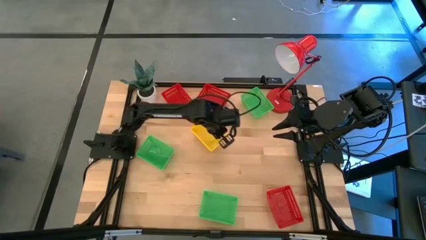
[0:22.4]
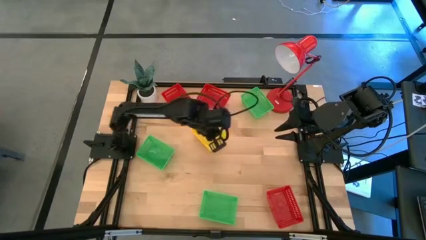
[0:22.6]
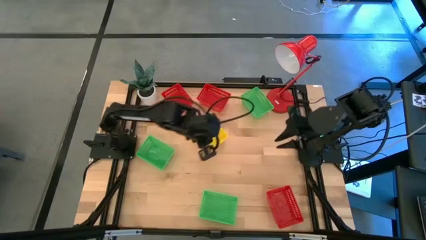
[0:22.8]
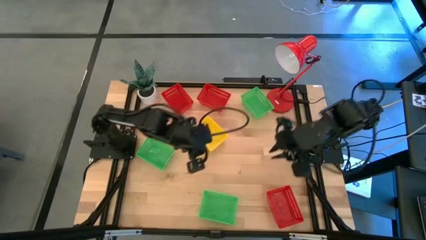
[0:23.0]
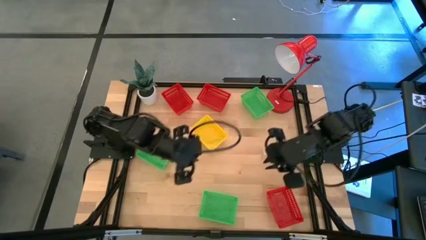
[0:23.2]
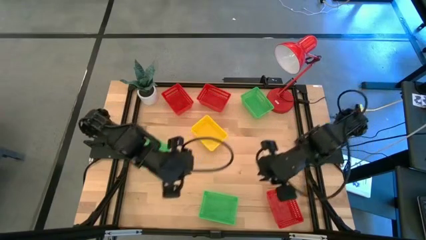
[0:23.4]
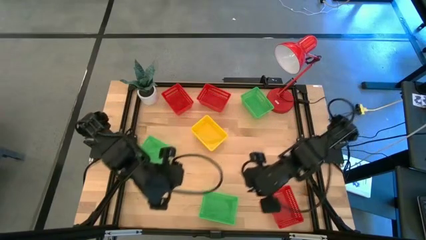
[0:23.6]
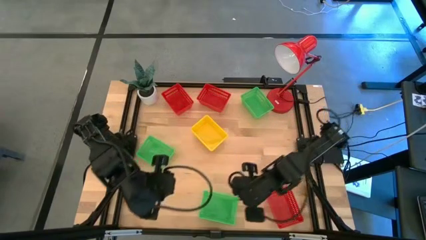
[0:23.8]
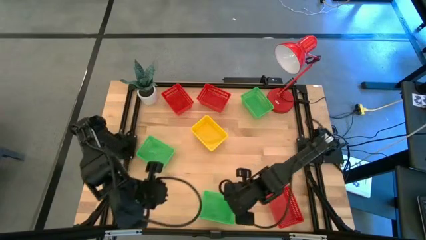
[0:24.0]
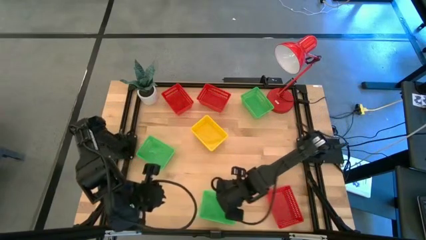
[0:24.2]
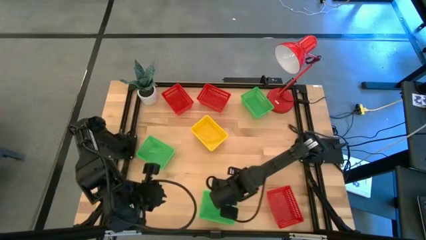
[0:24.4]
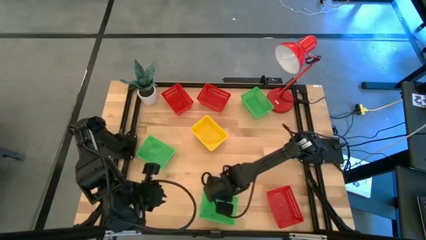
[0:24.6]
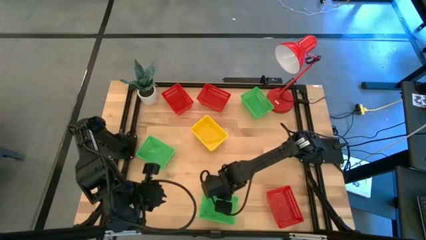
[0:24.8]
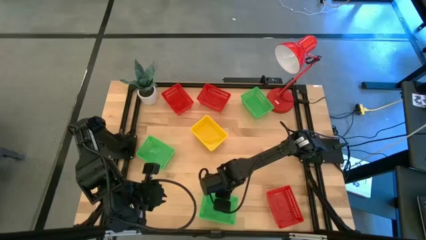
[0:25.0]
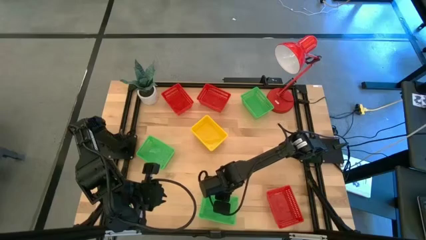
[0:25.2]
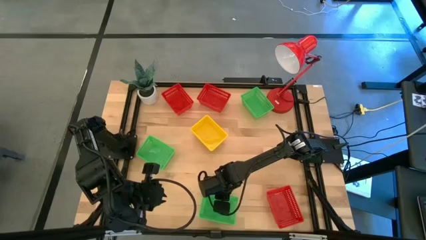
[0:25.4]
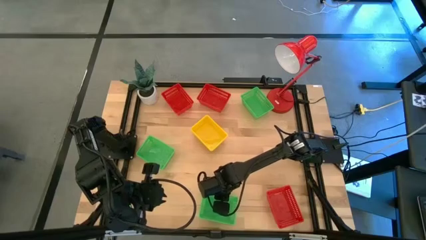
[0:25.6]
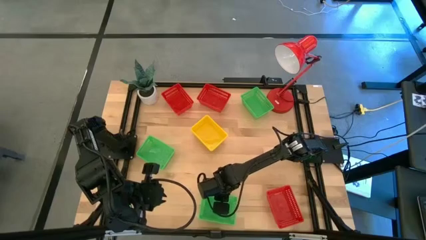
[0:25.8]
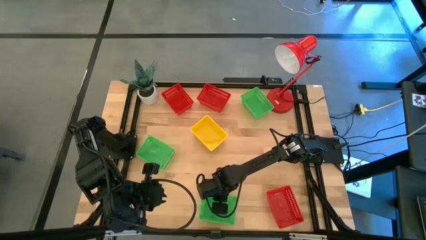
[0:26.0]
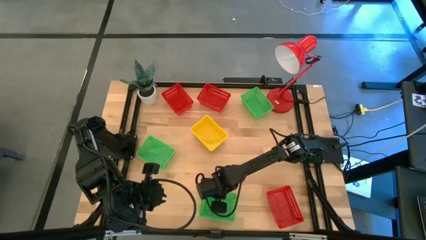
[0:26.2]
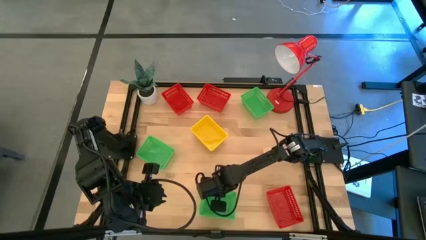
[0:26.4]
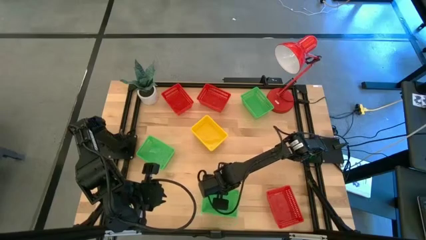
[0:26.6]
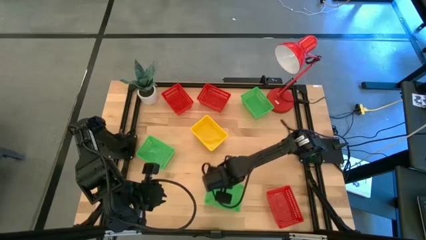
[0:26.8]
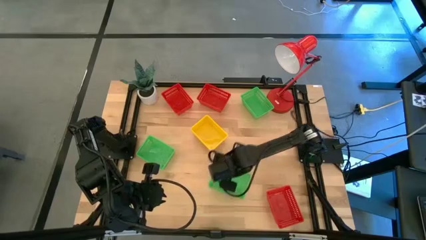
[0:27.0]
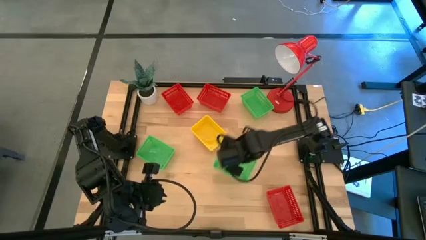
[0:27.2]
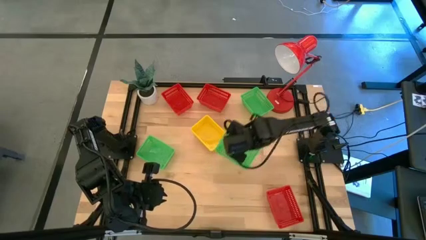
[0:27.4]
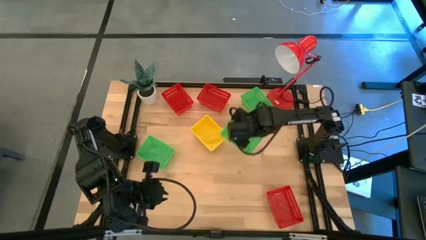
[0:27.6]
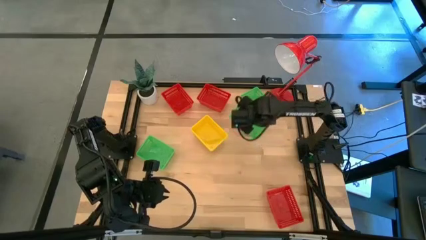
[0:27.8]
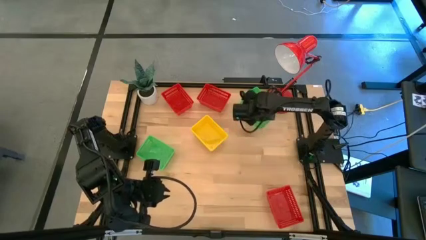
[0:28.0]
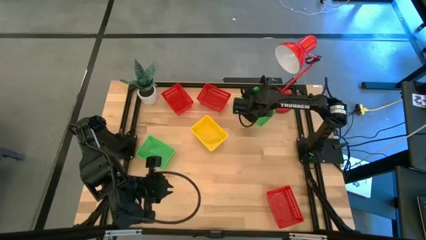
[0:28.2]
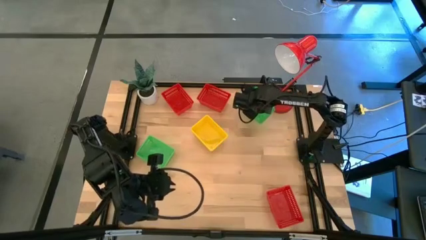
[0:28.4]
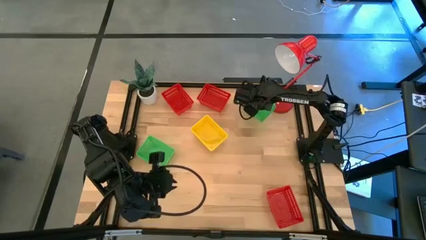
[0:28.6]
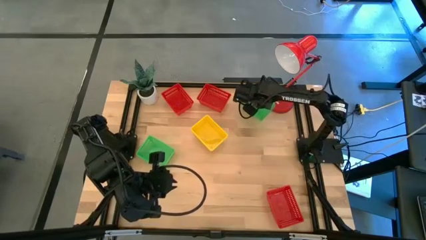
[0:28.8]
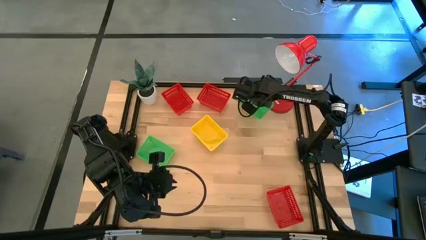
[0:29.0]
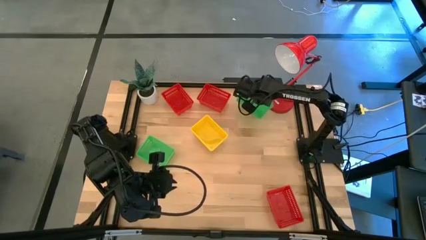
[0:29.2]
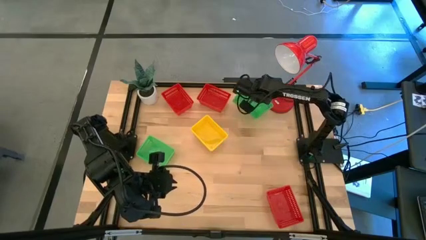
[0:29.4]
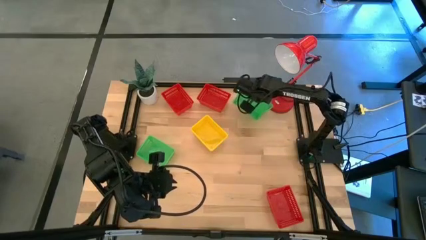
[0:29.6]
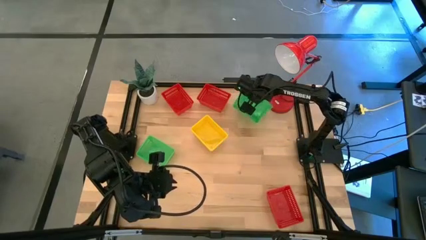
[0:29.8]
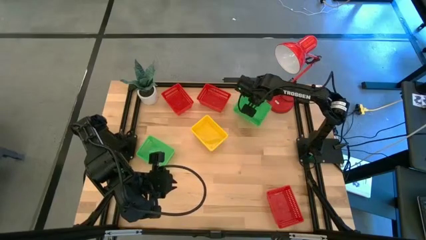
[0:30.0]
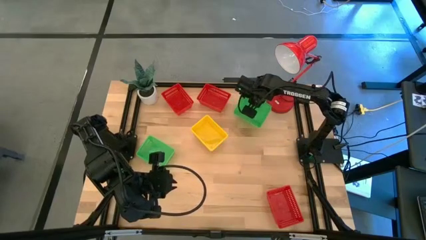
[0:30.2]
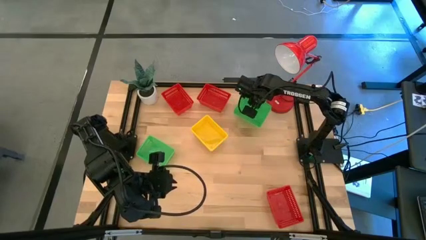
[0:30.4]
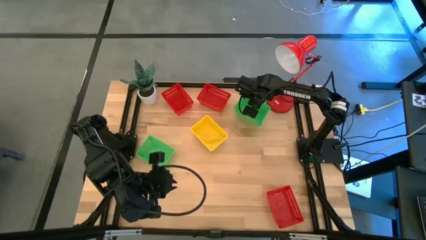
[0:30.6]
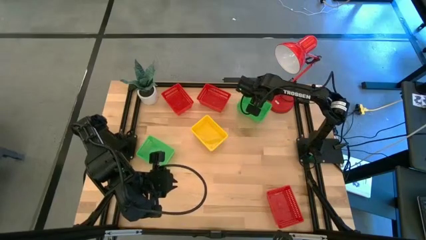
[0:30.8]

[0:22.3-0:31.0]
Stack the bottom green bin on the green bin

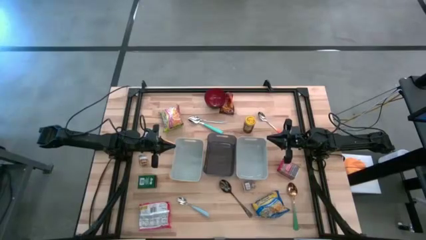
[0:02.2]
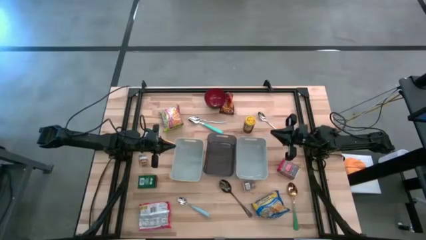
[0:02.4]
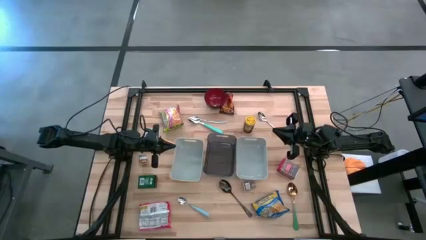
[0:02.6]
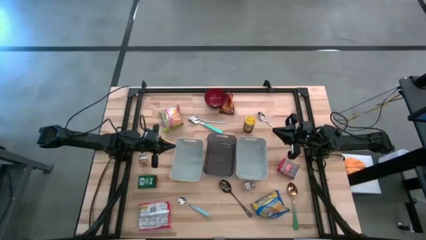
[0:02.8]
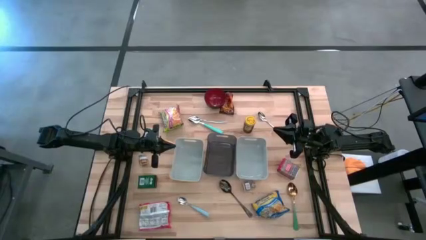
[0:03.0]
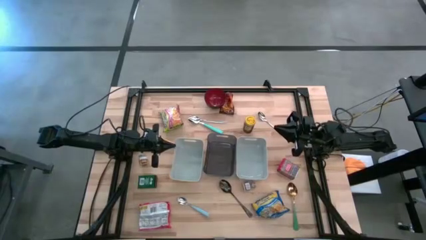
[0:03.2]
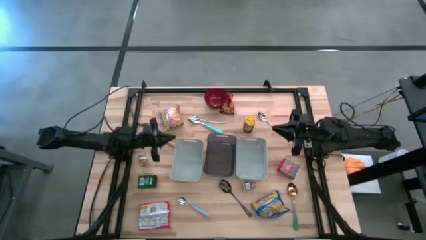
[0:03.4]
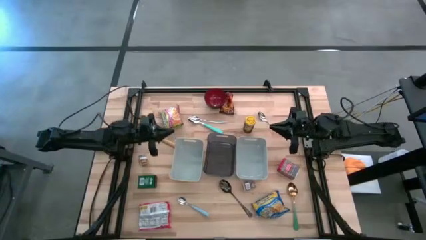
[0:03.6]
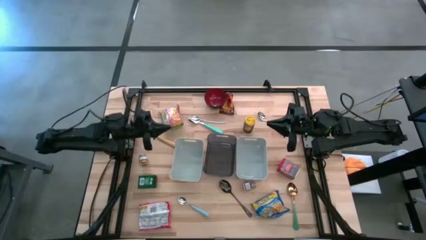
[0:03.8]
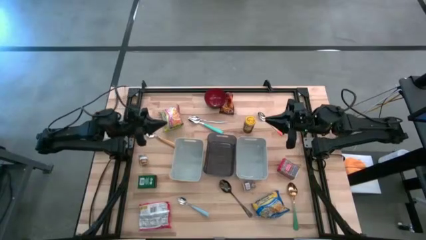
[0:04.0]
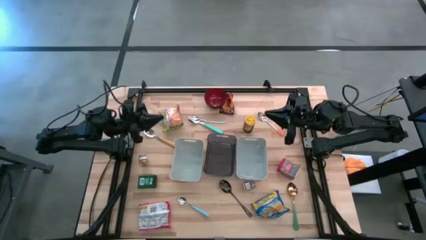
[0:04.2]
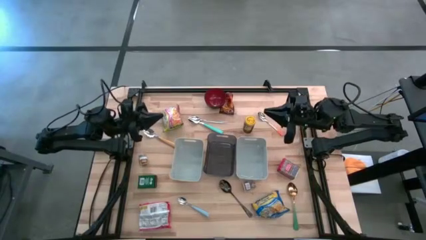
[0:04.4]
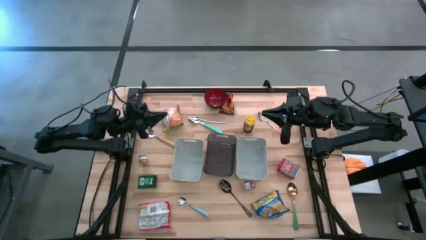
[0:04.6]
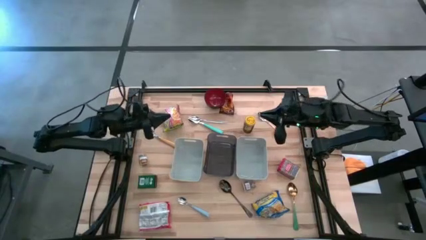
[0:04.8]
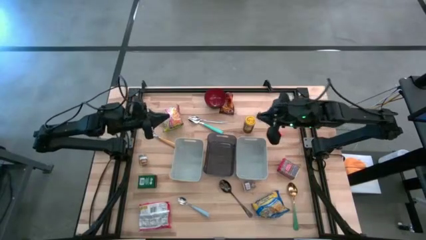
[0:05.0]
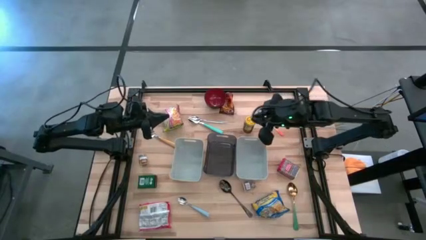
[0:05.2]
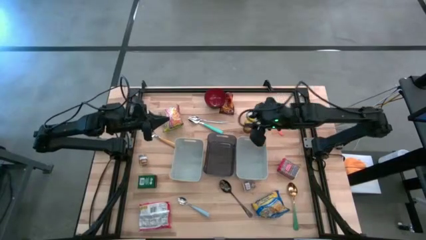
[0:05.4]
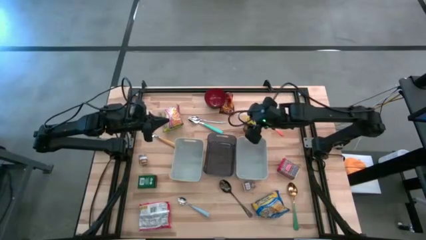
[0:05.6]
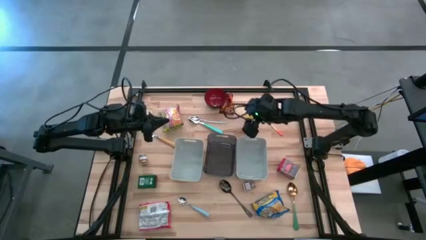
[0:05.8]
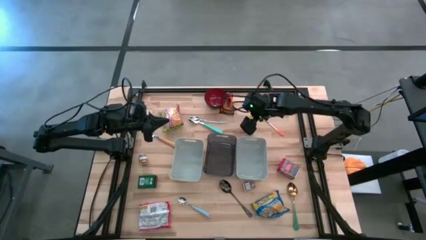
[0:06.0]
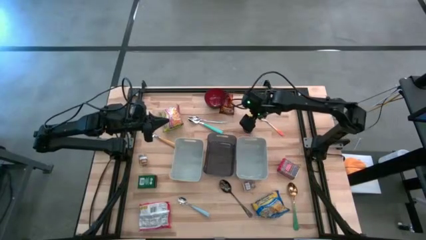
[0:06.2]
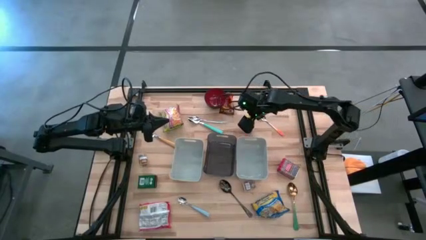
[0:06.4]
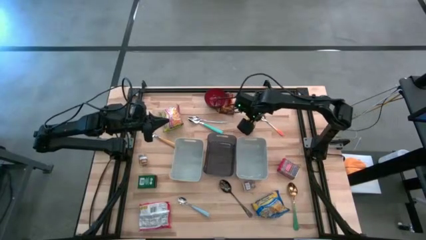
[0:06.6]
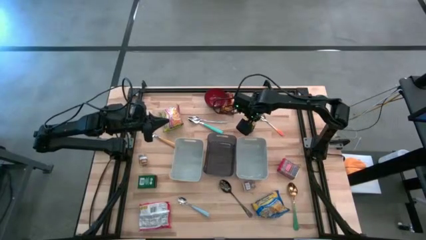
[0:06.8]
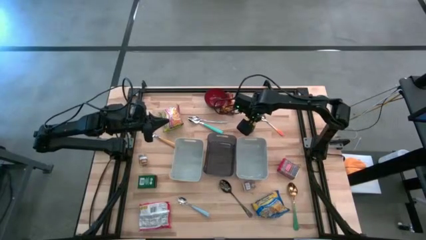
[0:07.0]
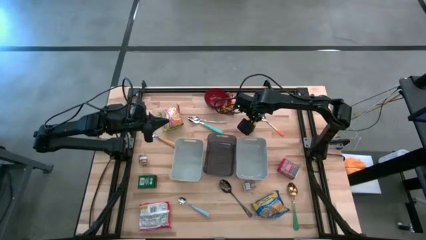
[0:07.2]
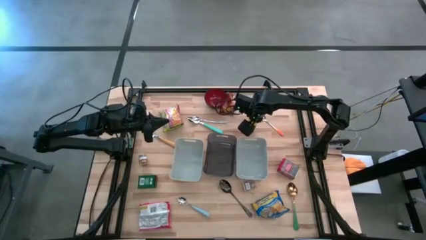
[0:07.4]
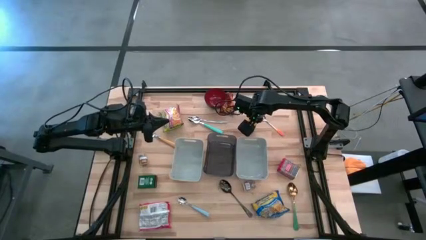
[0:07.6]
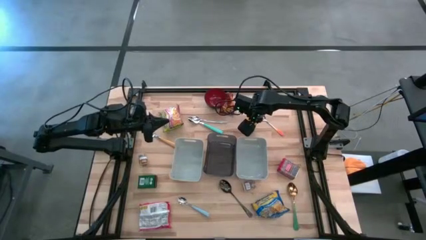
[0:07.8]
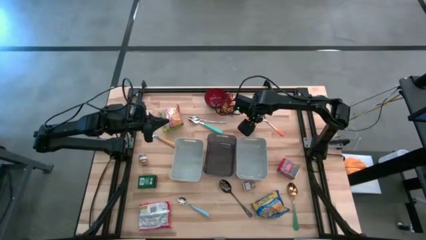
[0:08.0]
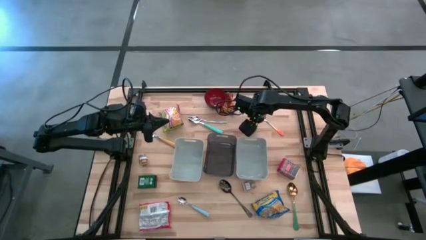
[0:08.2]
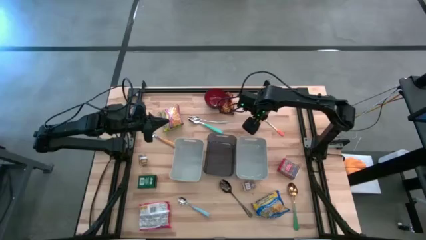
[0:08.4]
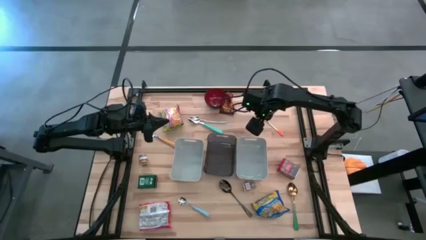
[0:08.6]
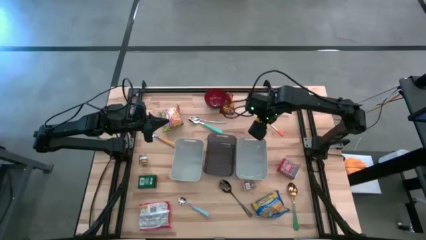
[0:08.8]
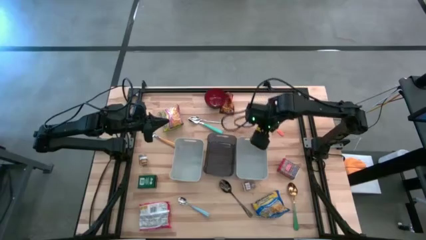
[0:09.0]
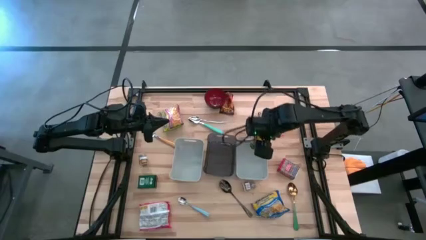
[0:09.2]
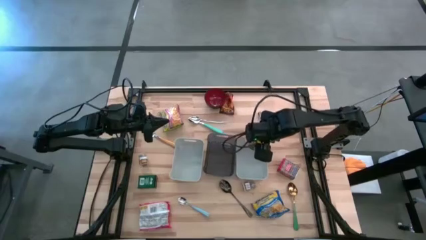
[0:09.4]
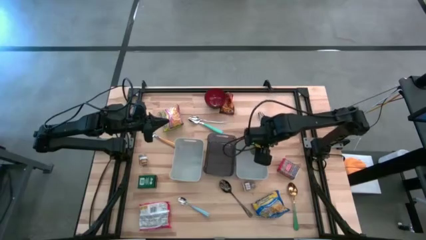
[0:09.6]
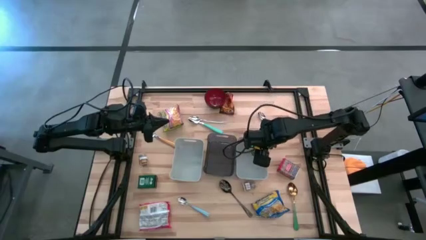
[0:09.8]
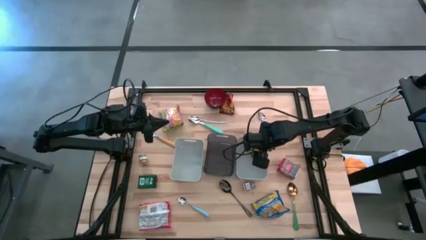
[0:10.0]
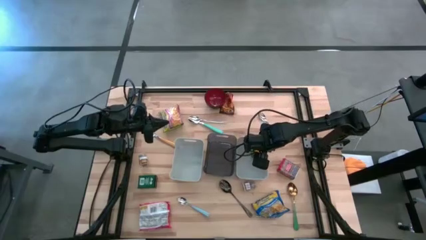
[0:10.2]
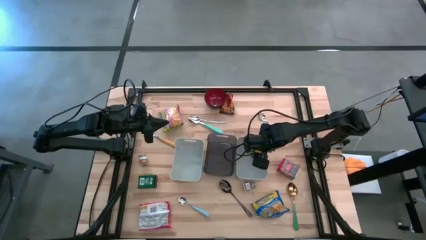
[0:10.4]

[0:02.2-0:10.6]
Put the yellow seasoning bottle into the right gray bin
